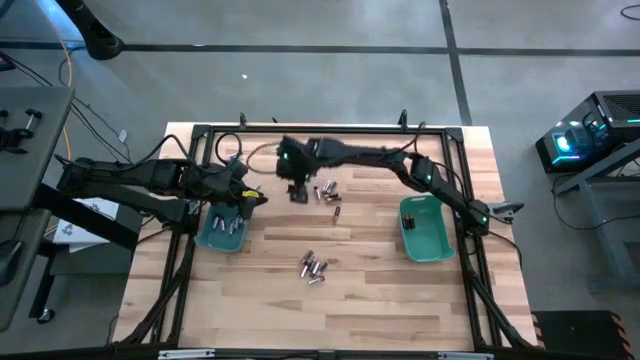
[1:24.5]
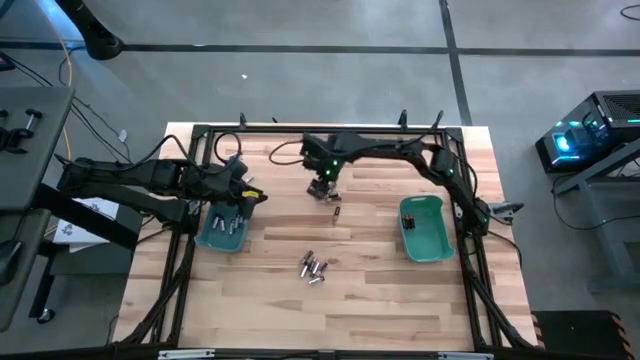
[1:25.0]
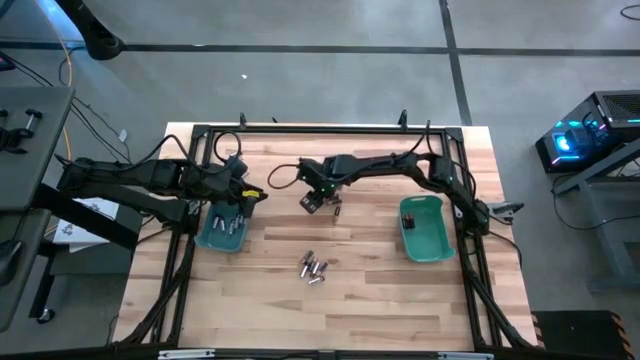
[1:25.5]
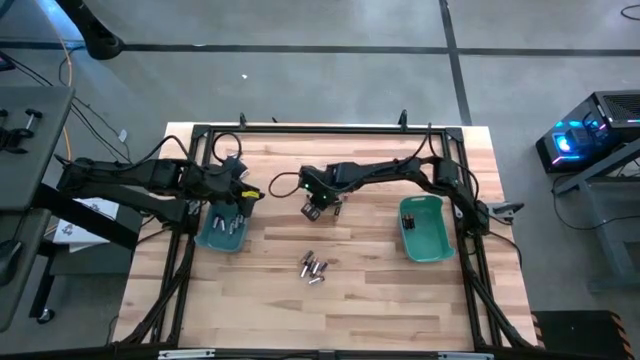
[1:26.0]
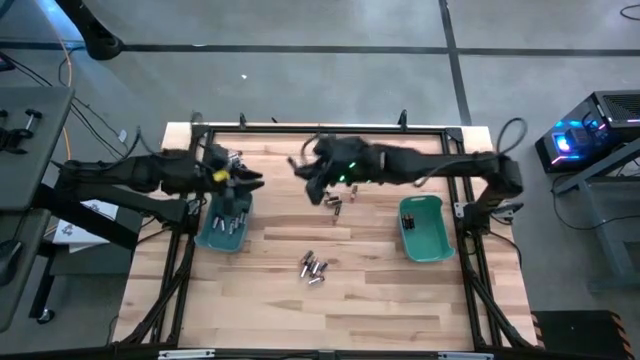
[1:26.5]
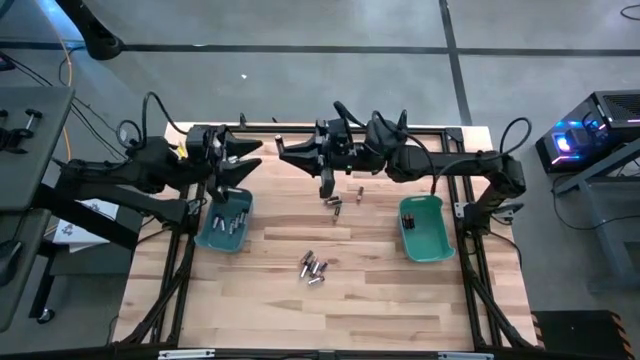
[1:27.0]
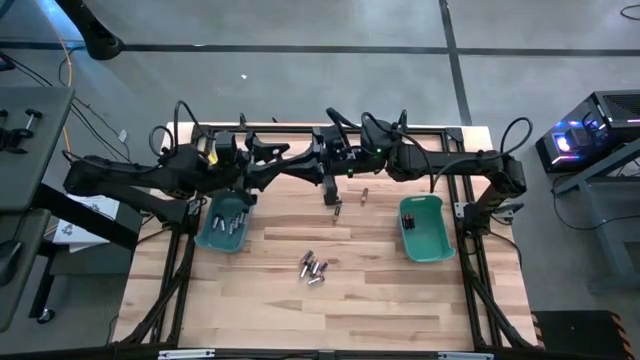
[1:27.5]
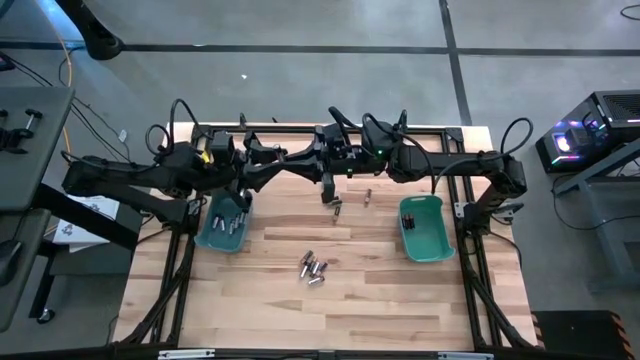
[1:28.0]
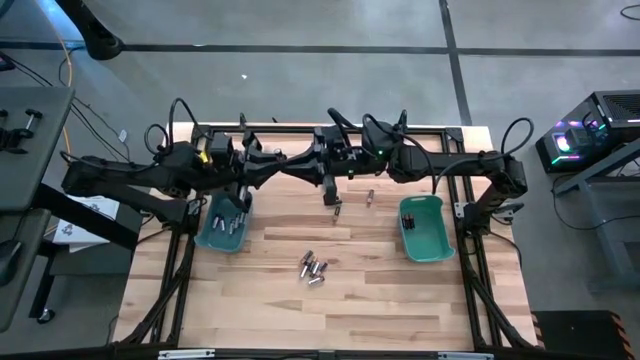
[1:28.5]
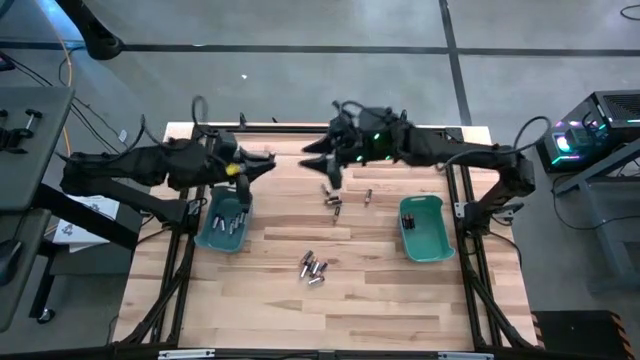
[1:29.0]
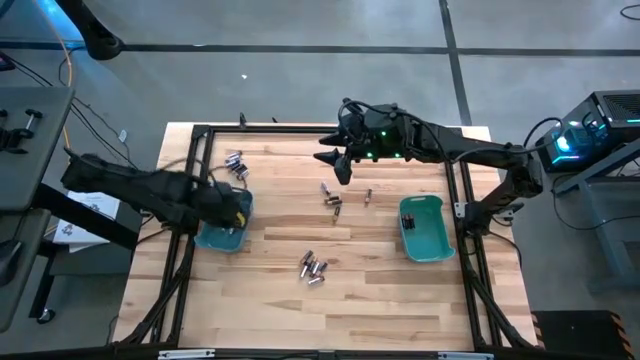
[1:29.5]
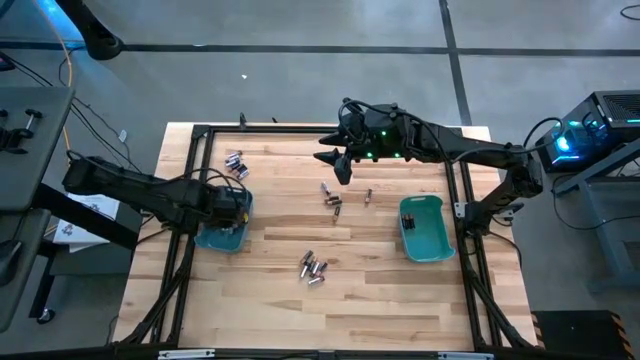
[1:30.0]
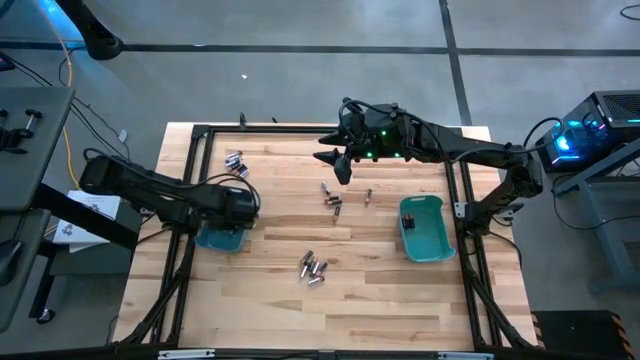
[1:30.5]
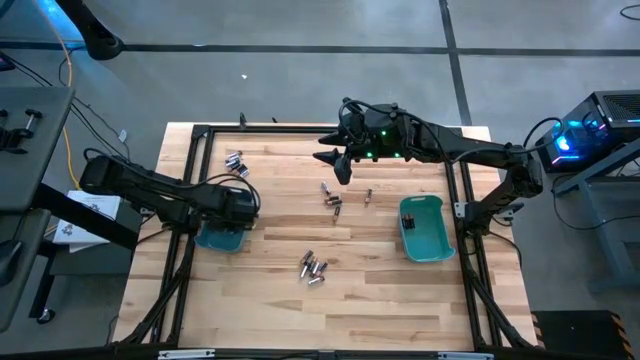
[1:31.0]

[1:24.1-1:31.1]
Task: Sort batteries
Put the silver battery into the blue bin

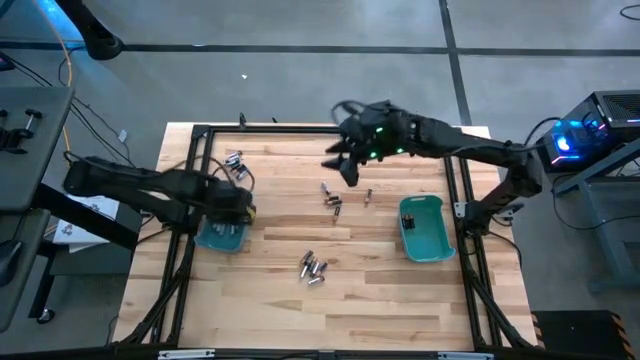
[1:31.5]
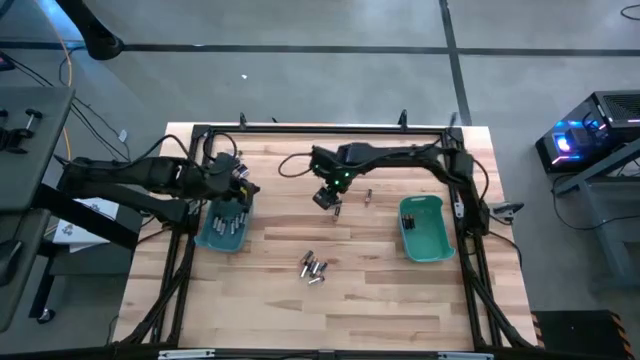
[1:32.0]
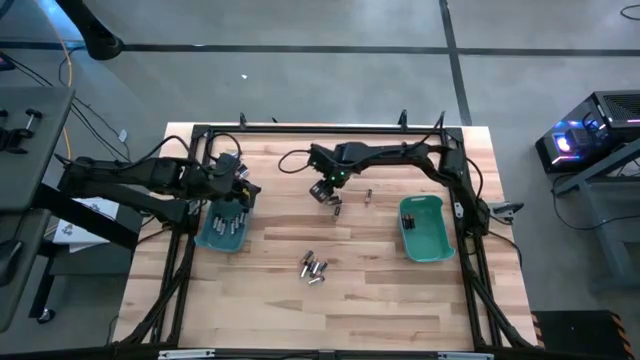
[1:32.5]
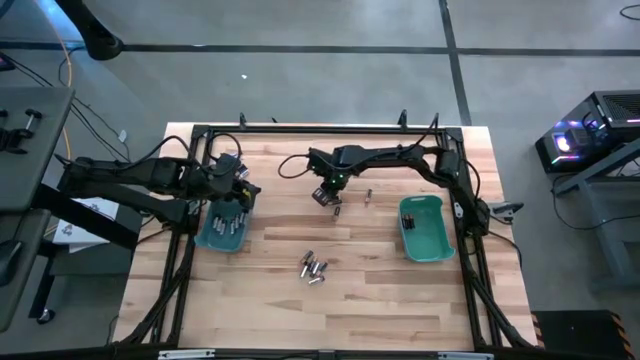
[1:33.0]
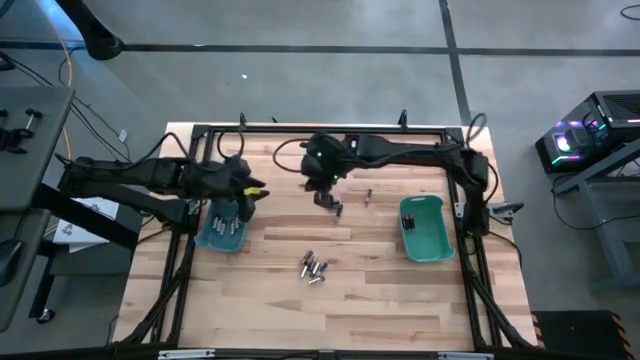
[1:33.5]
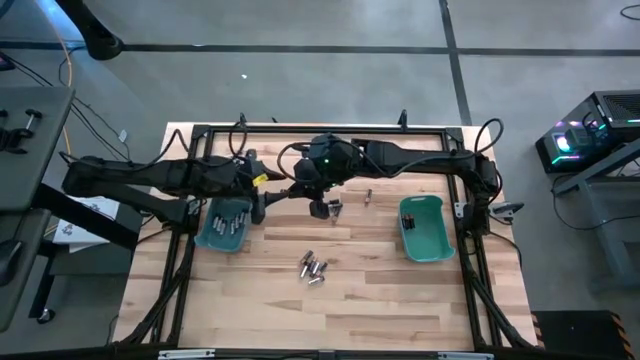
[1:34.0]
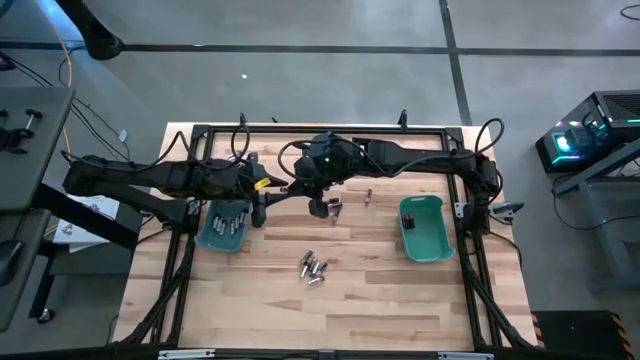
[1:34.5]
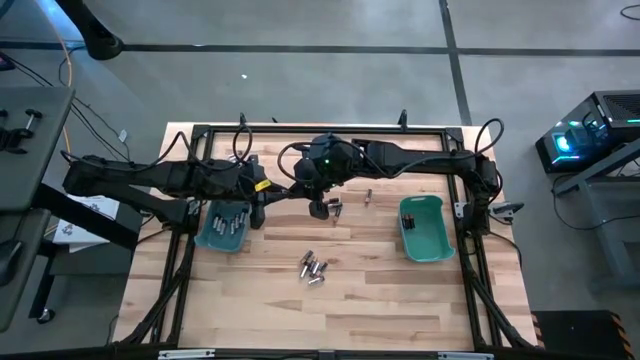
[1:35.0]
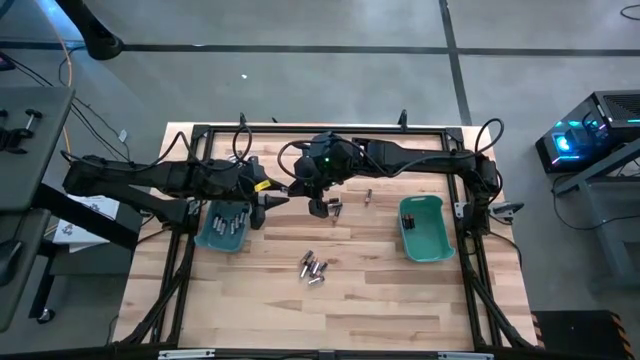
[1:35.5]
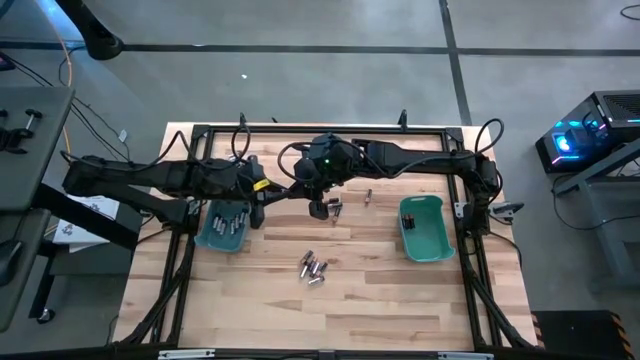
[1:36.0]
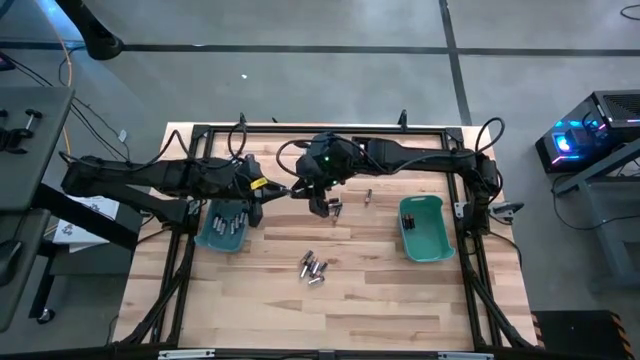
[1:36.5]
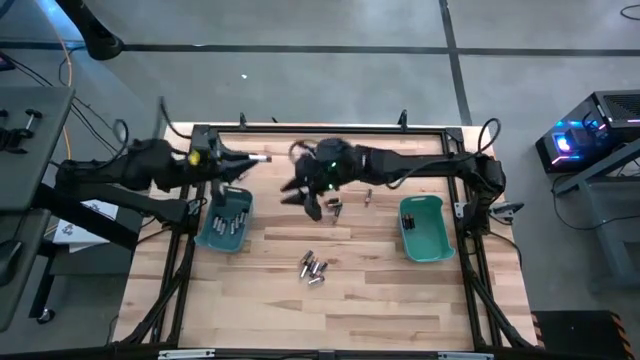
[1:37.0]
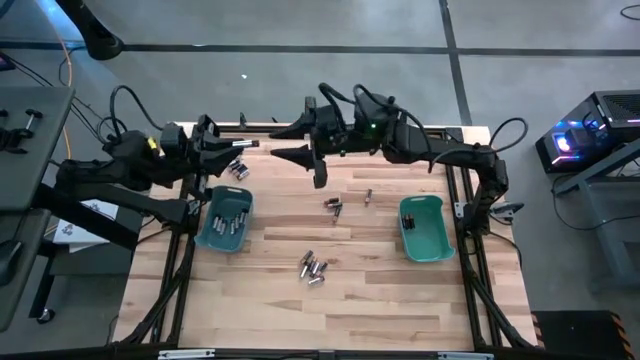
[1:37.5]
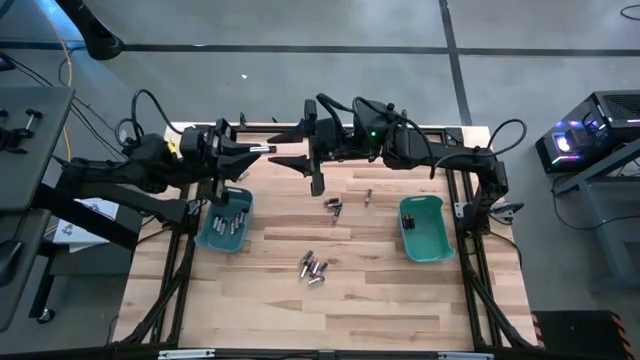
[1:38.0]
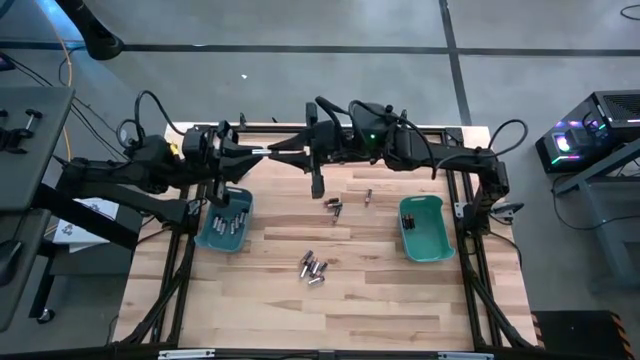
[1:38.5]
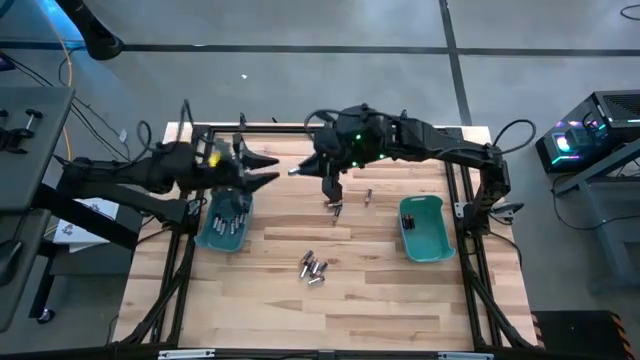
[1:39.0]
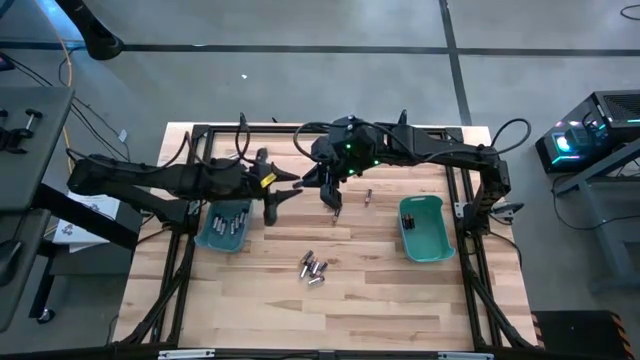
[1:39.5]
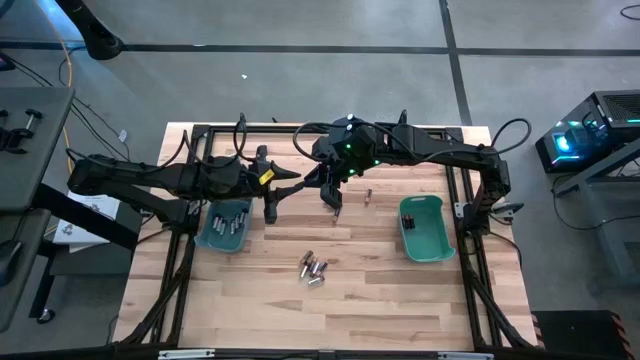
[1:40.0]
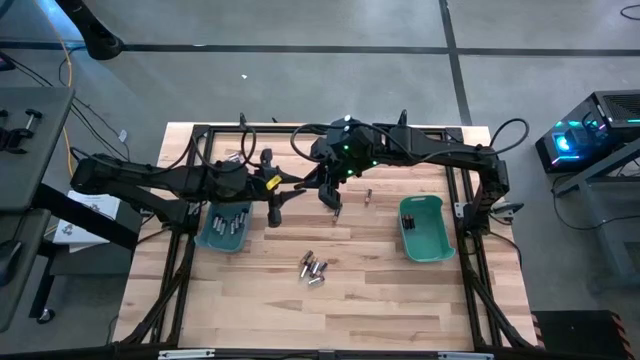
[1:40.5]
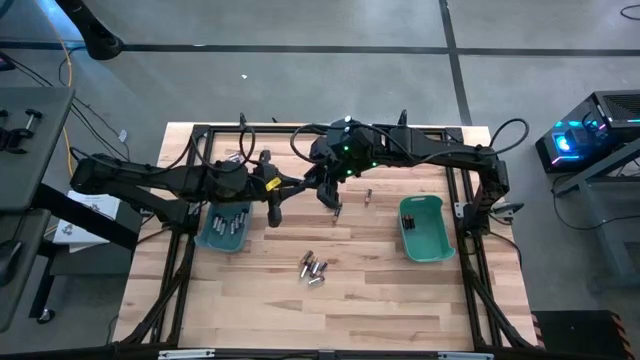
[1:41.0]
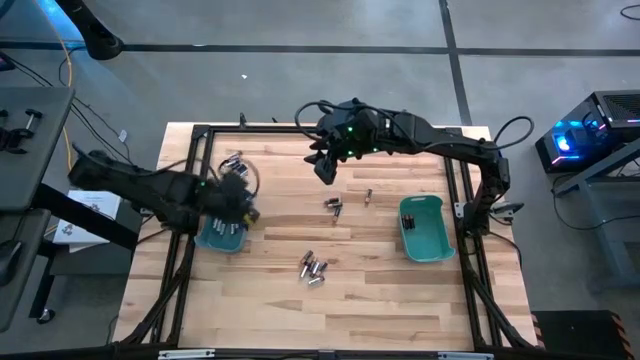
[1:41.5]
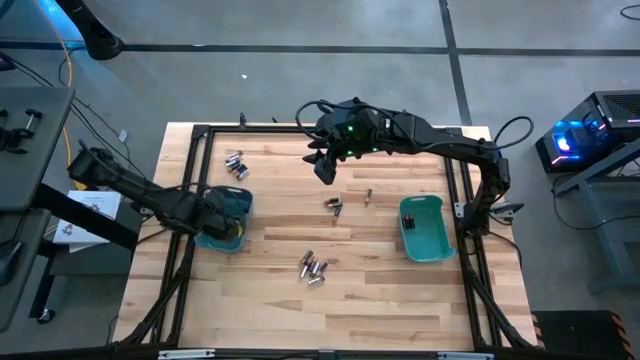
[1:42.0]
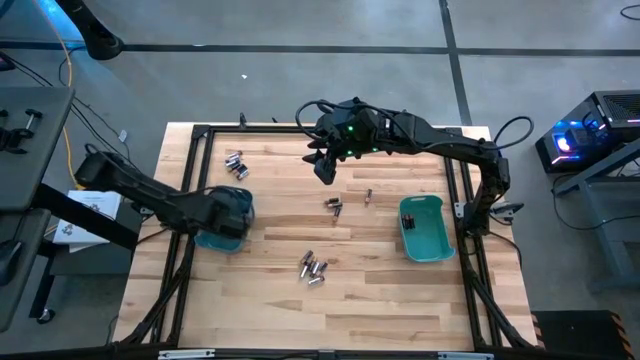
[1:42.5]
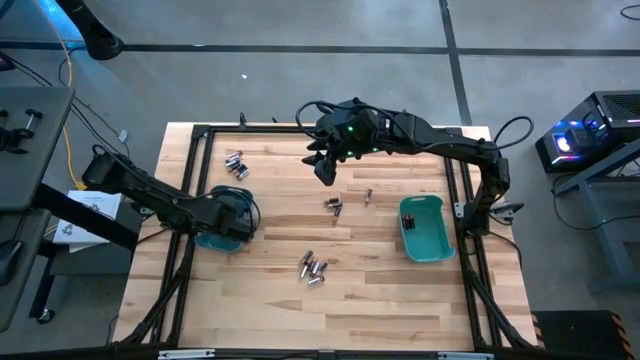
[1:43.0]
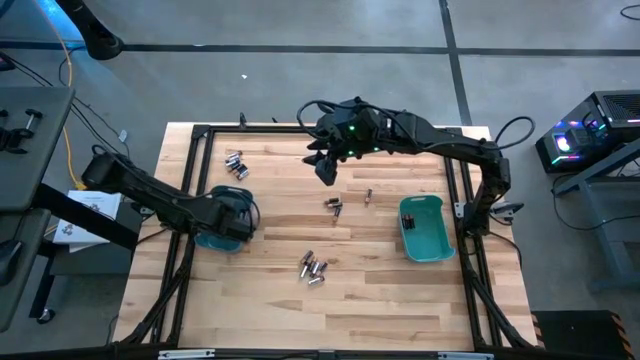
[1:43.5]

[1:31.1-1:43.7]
Put the silver battery into the blue bin

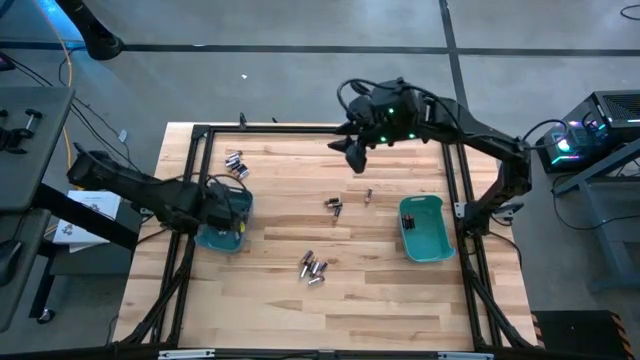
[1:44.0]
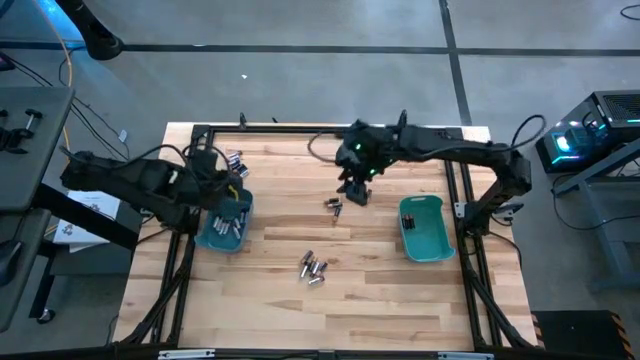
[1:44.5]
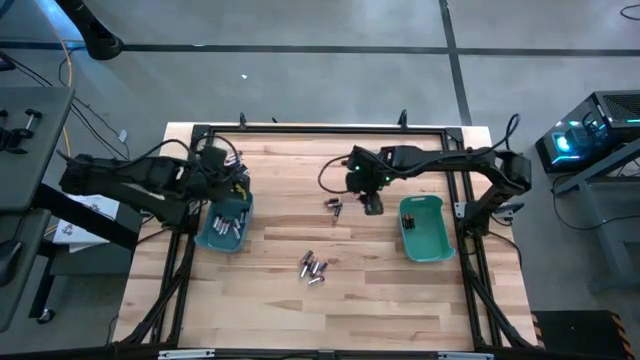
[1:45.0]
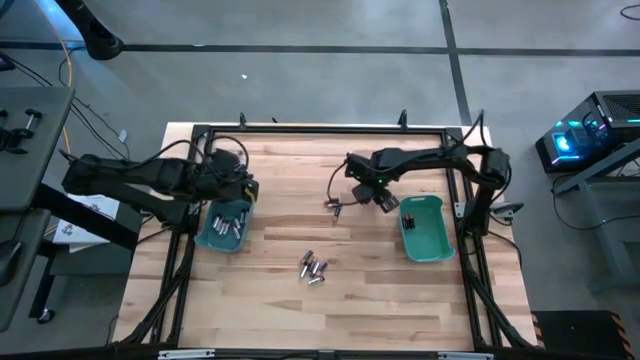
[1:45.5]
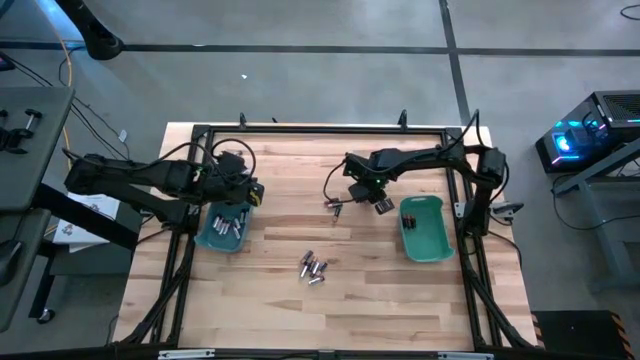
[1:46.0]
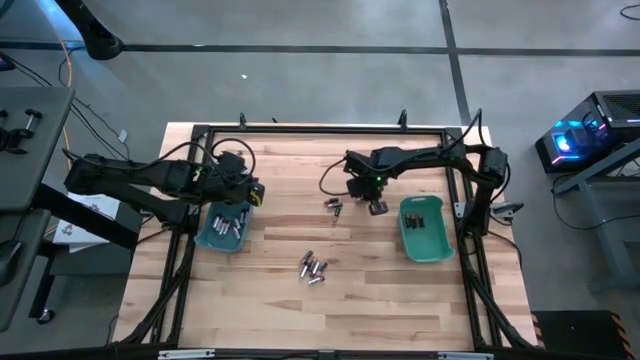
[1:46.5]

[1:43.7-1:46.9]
Put the black battery into the green bin
